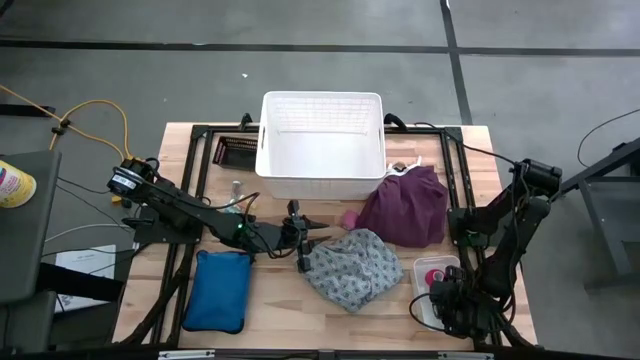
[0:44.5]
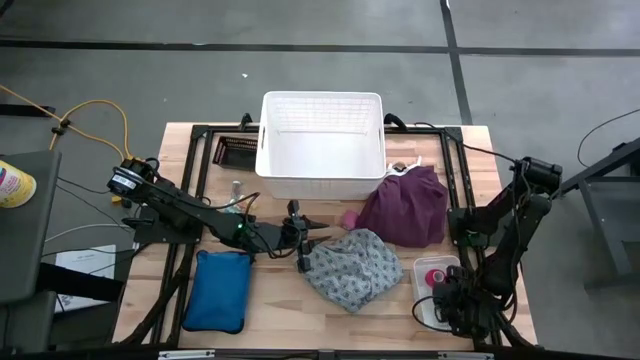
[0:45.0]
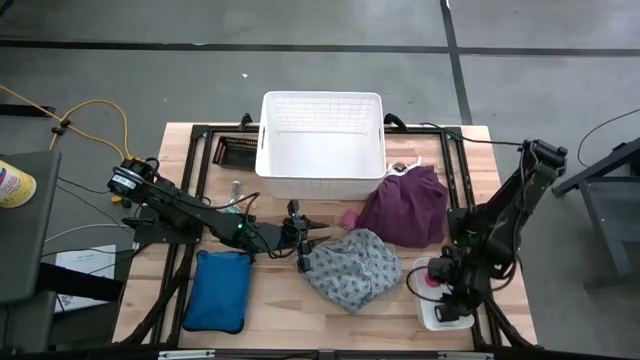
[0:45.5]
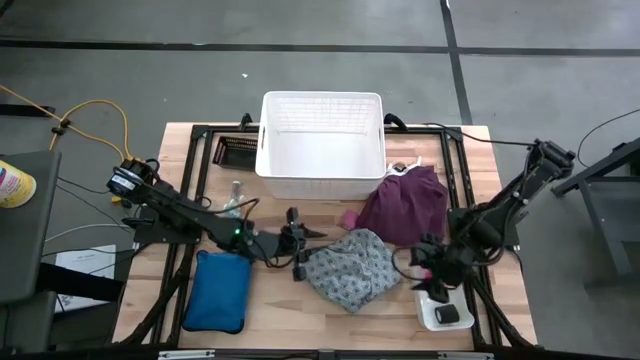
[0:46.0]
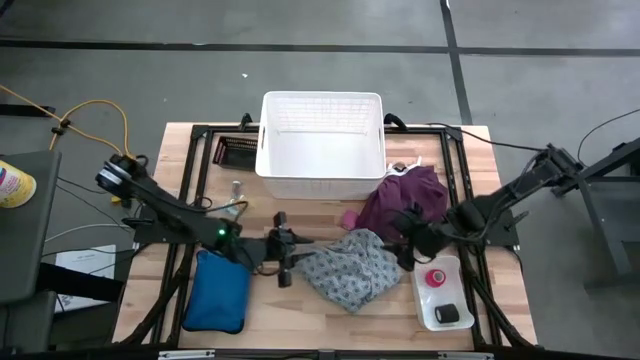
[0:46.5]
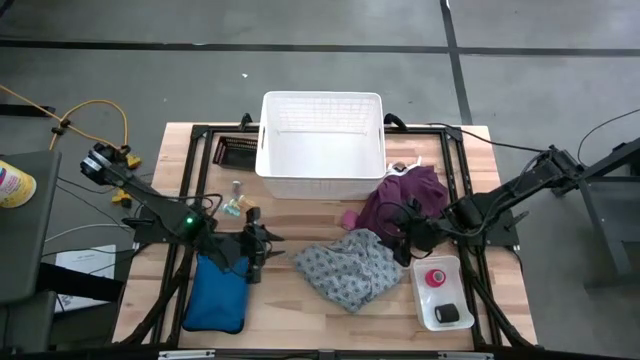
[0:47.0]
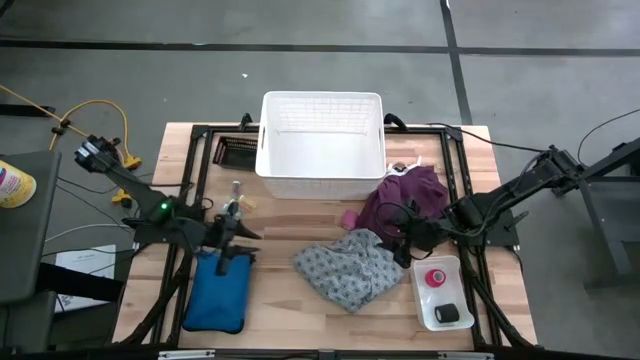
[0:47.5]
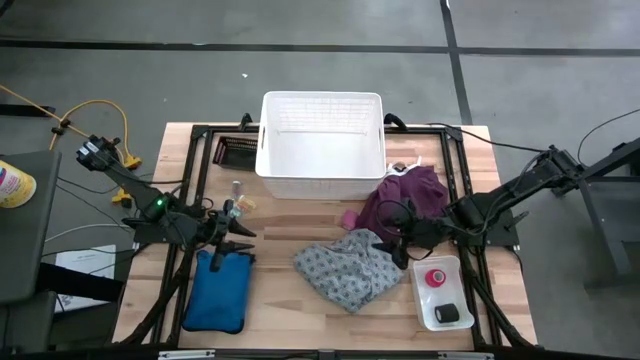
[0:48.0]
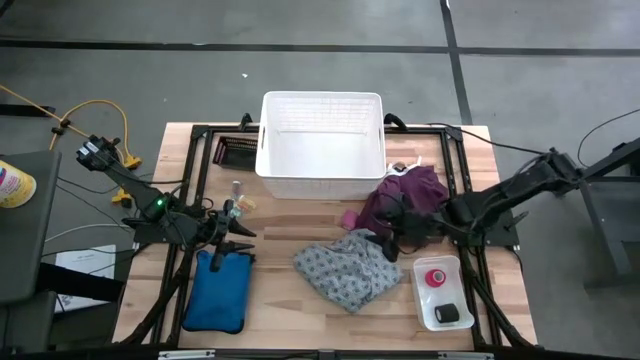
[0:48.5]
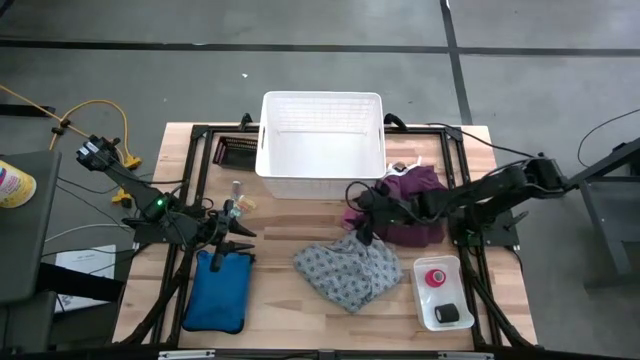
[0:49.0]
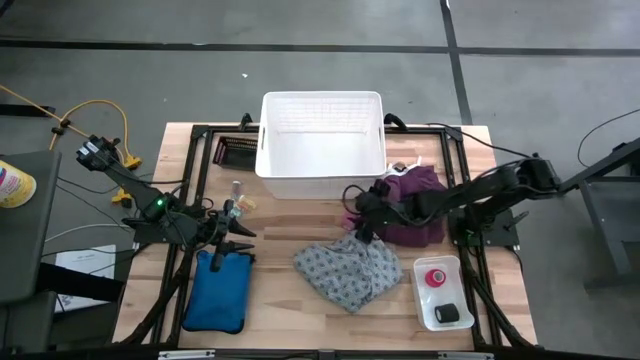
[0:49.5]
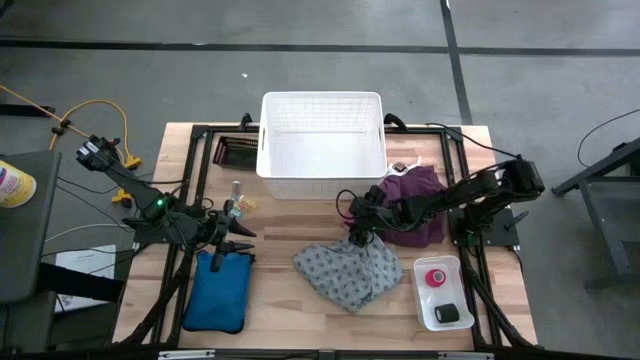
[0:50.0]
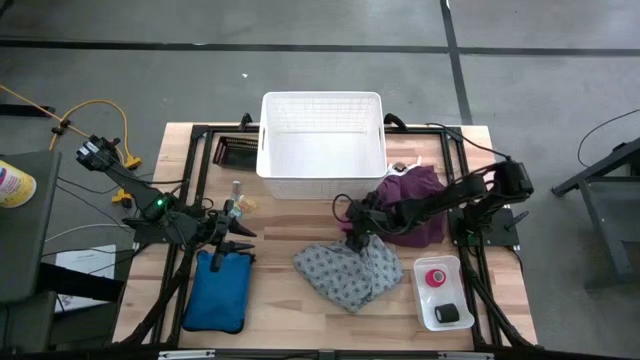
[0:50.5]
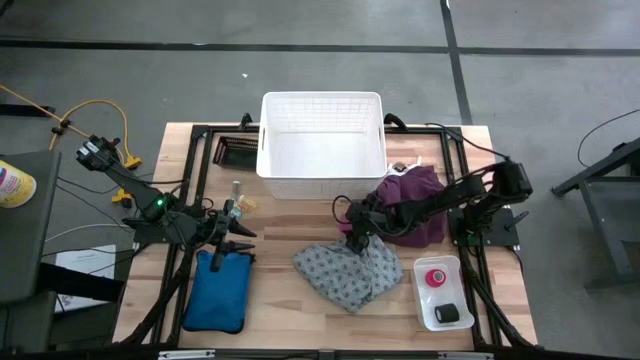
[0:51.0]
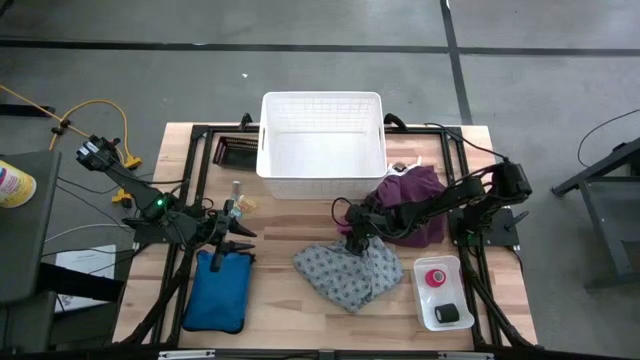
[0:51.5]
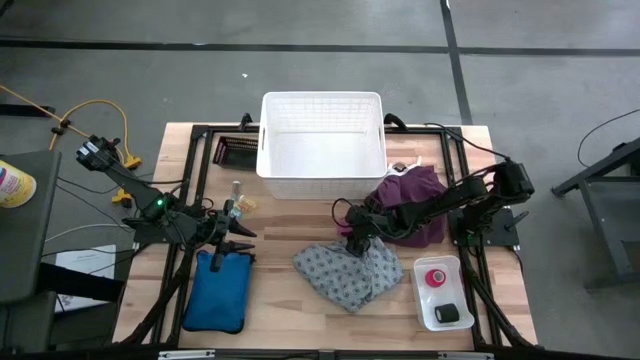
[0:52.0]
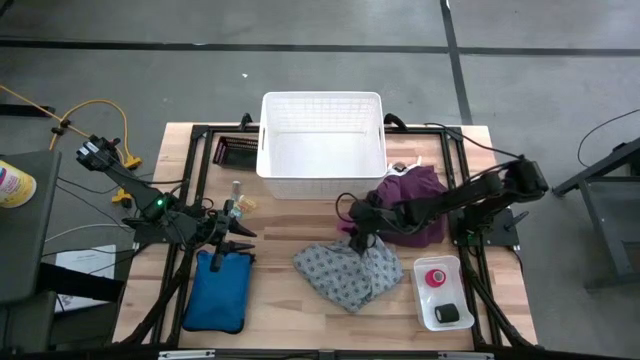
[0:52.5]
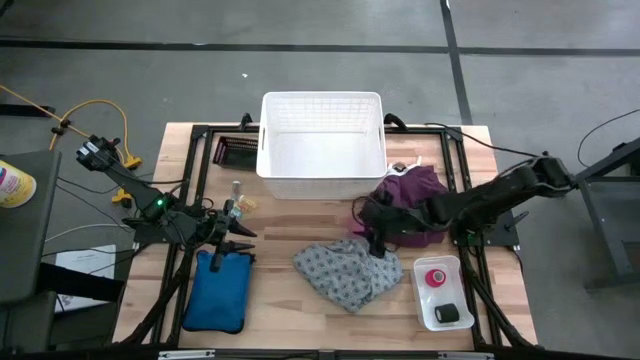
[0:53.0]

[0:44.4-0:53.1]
Task: Pick & place medical supplies in basket/bin
Put the pink bandage into the small white bin

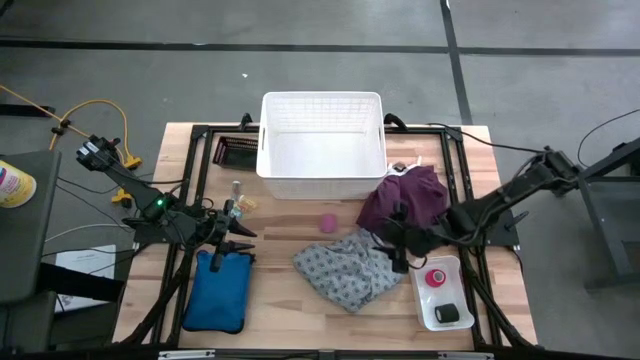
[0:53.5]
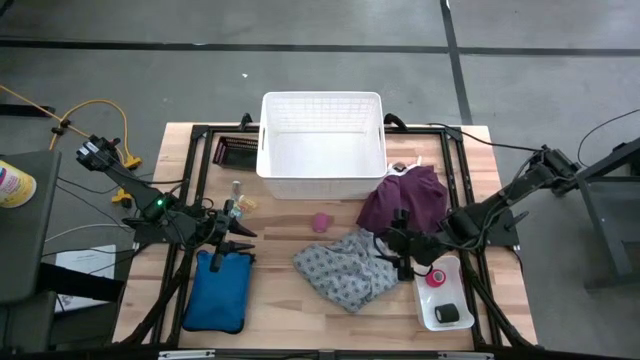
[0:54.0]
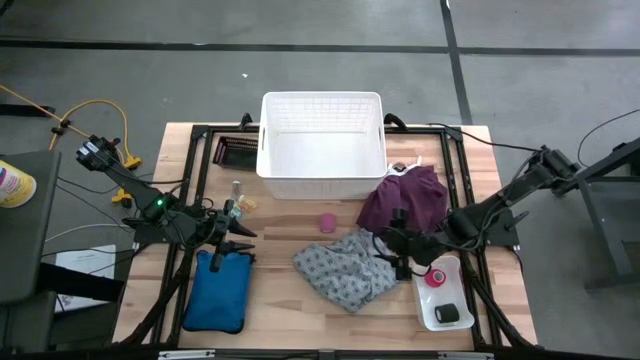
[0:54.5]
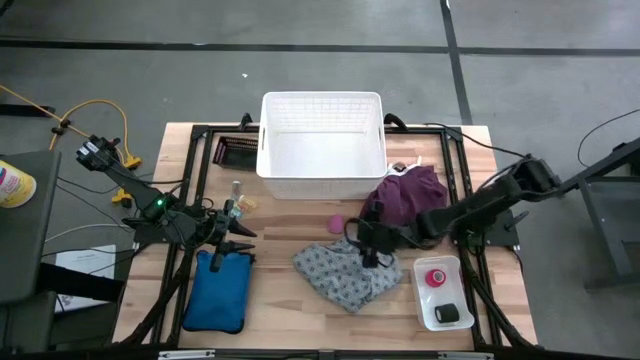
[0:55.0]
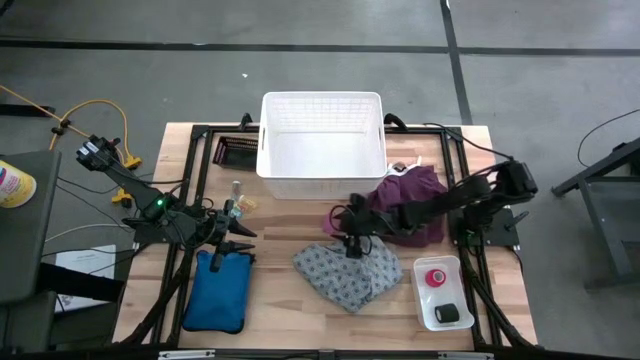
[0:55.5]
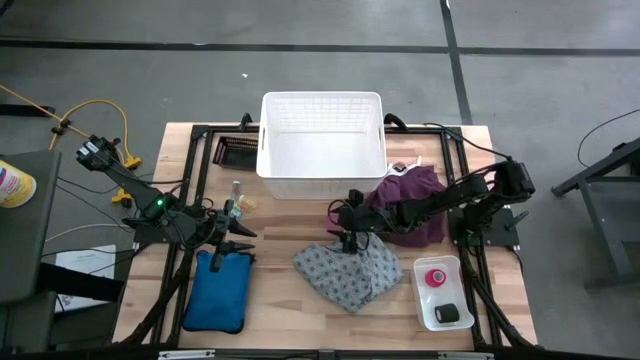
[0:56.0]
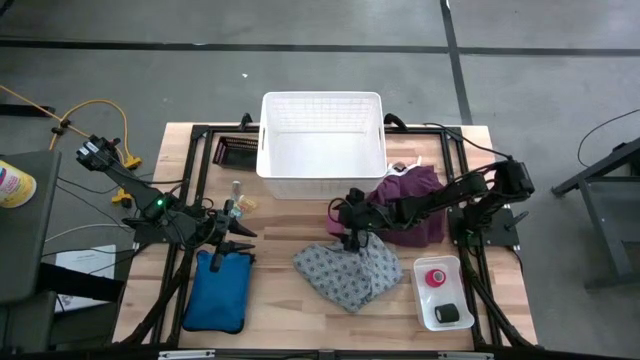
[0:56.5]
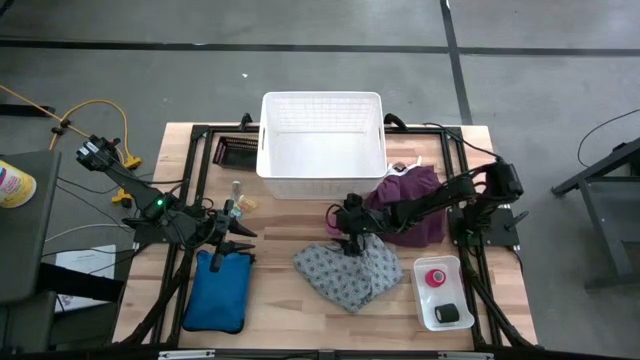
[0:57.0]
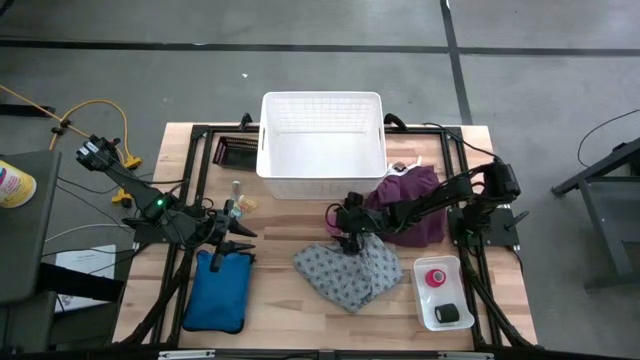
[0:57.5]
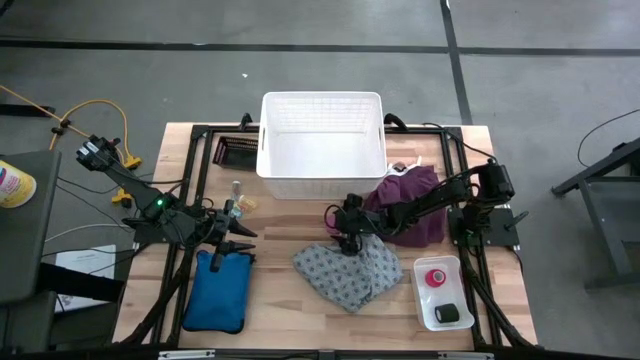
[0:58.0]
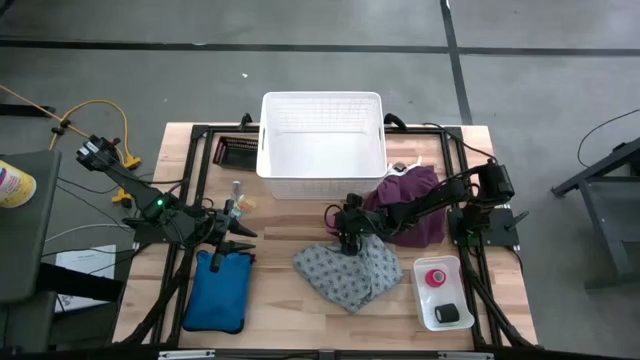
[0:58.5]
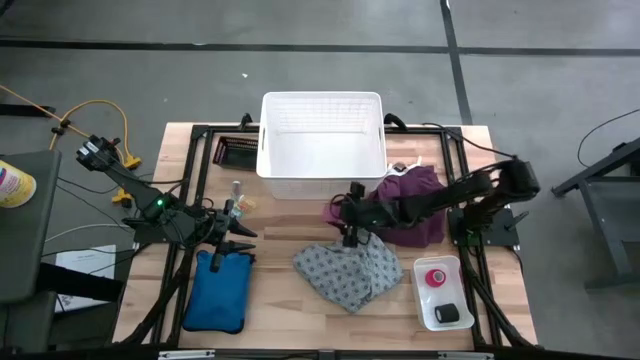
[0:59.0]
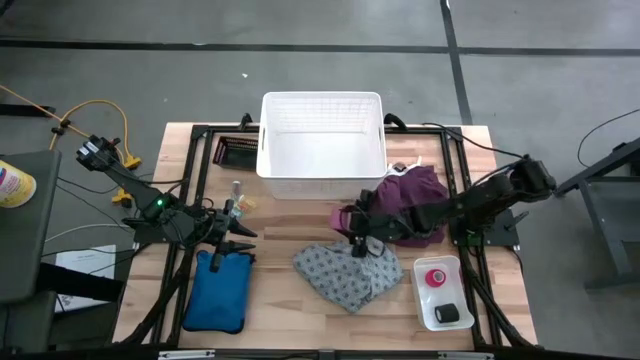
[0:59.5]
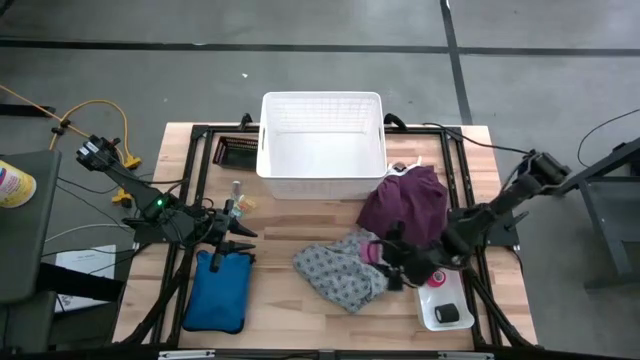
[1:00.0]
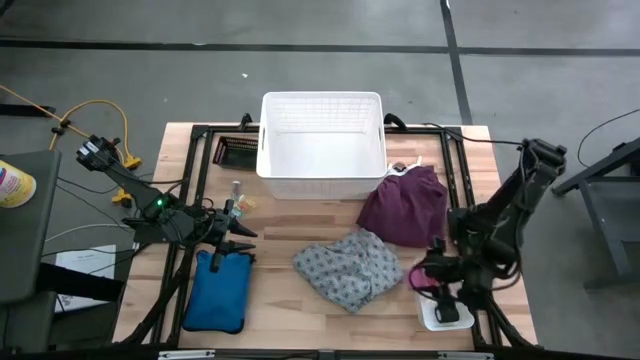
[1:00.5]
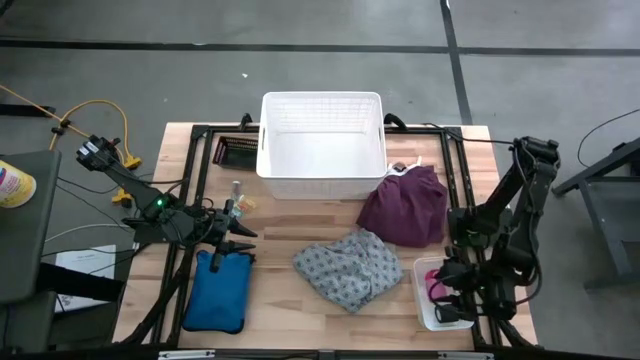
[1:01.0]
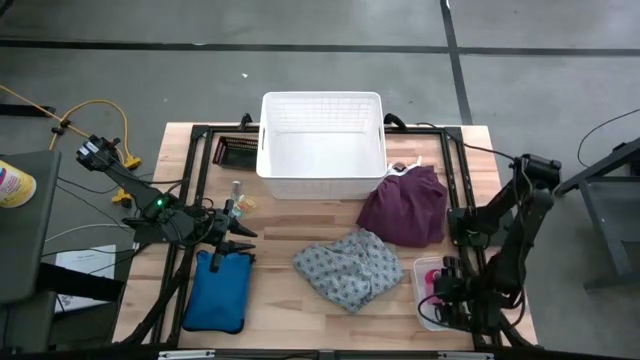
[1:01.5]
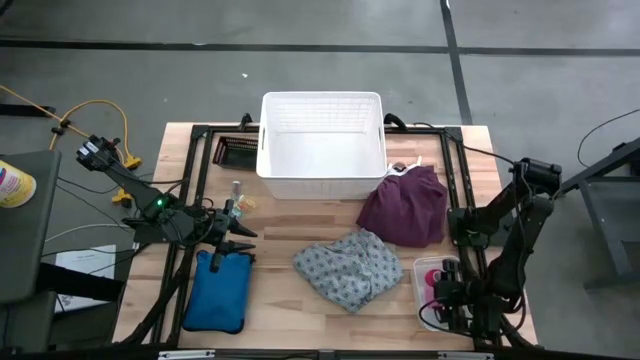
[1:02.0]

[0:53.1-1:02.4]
Put the pink bandage into the small white bin
